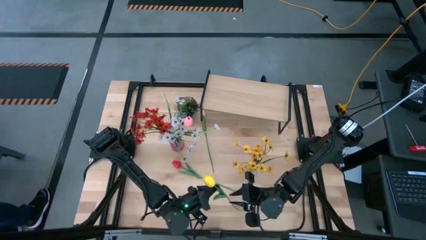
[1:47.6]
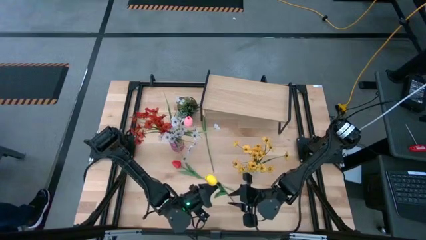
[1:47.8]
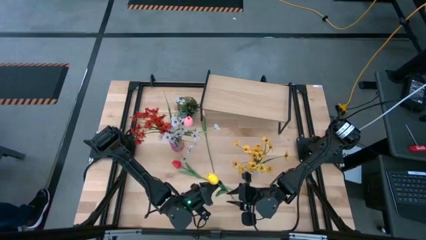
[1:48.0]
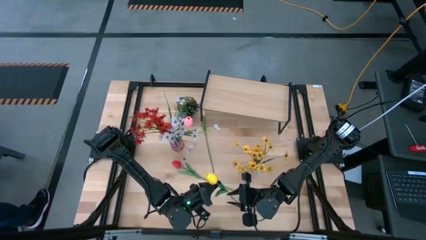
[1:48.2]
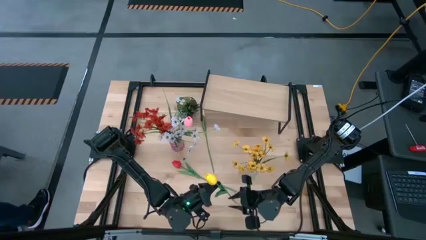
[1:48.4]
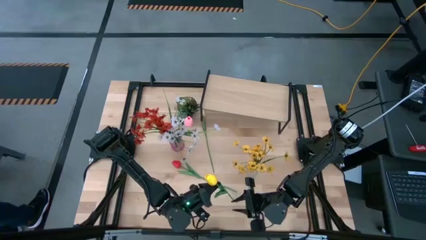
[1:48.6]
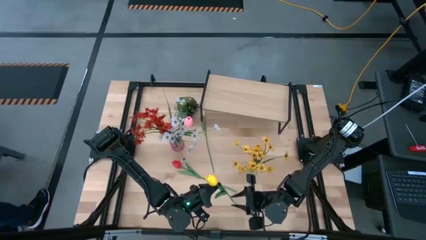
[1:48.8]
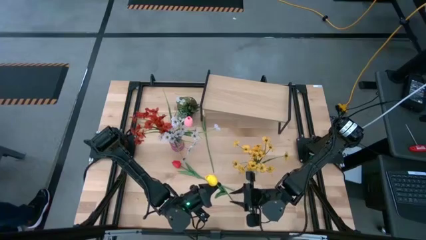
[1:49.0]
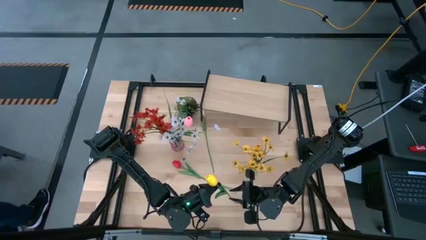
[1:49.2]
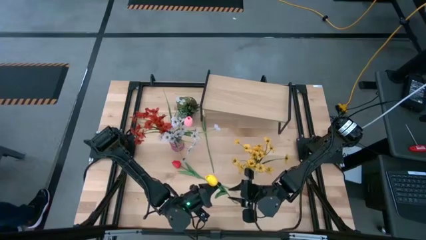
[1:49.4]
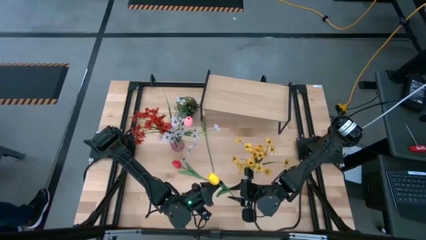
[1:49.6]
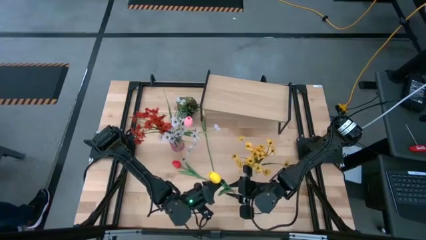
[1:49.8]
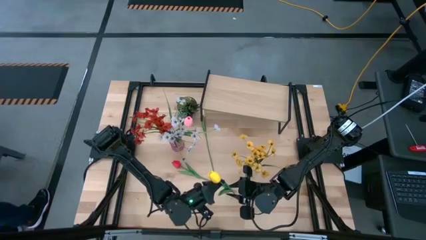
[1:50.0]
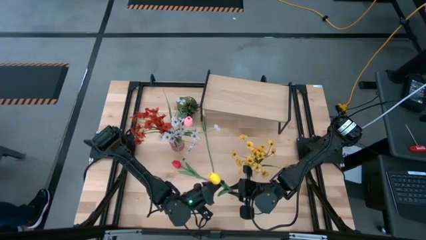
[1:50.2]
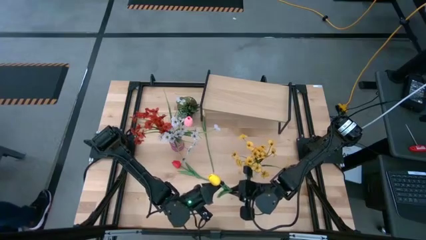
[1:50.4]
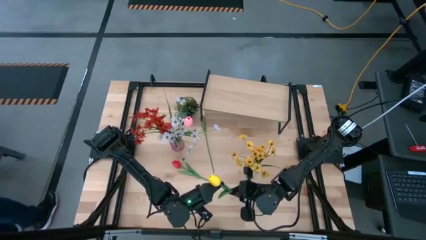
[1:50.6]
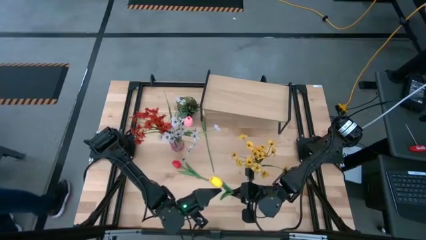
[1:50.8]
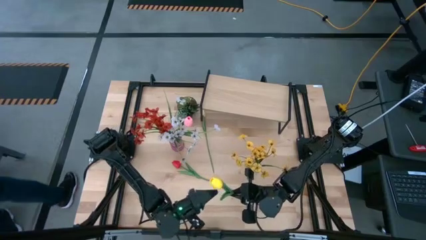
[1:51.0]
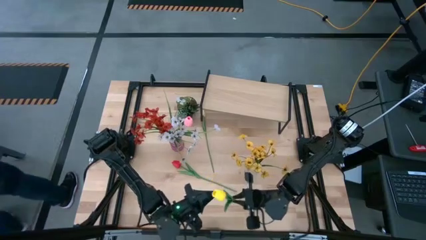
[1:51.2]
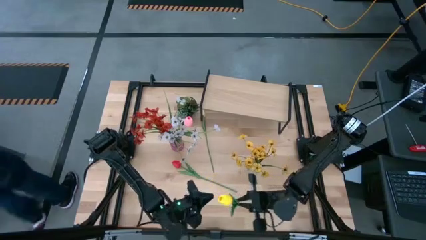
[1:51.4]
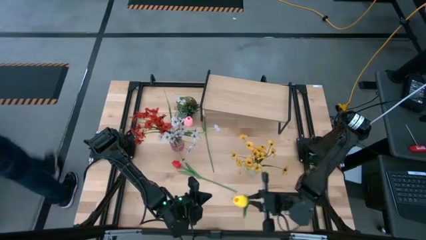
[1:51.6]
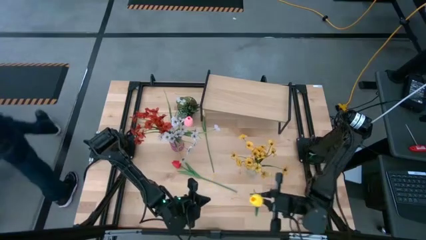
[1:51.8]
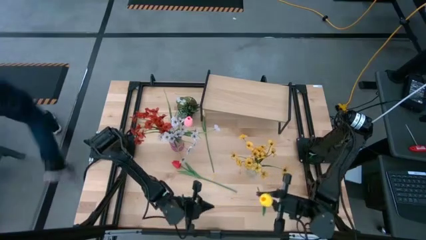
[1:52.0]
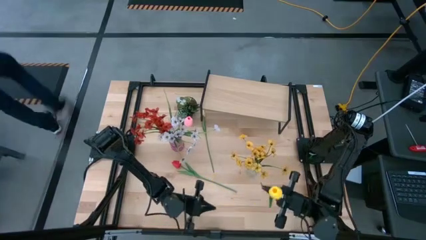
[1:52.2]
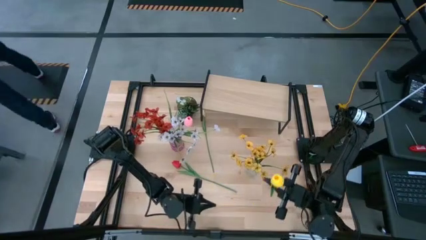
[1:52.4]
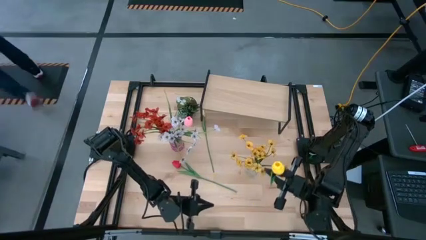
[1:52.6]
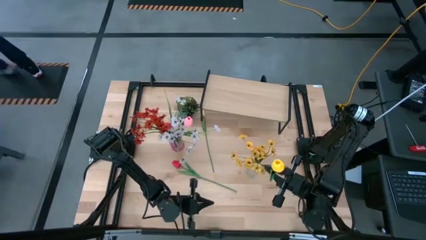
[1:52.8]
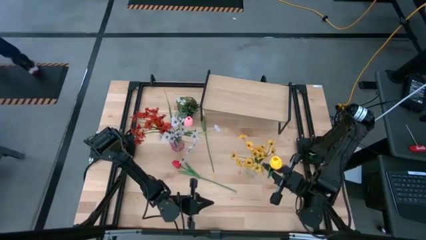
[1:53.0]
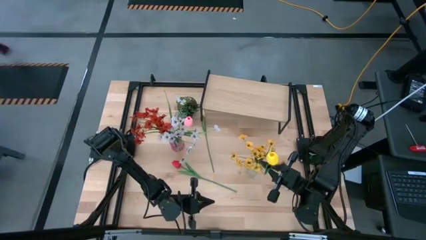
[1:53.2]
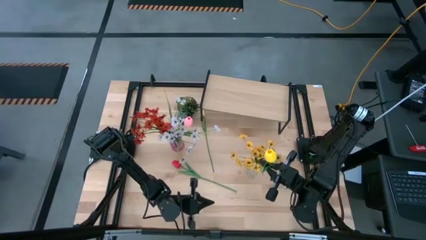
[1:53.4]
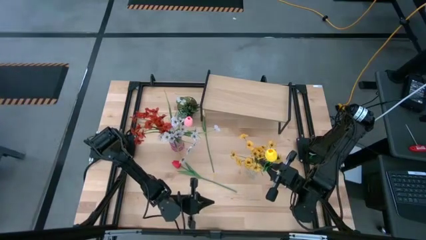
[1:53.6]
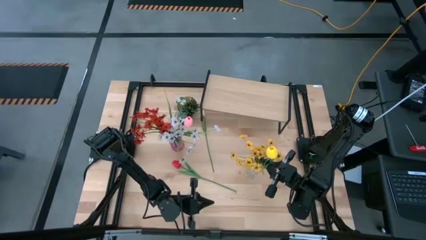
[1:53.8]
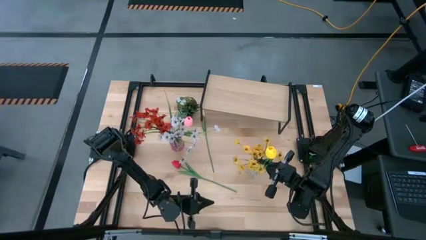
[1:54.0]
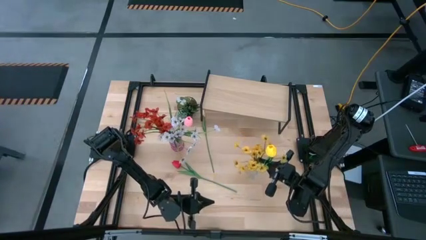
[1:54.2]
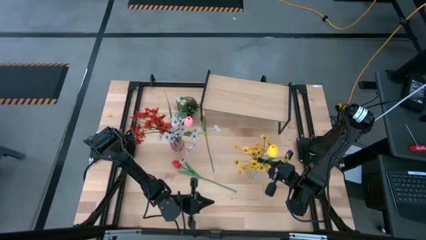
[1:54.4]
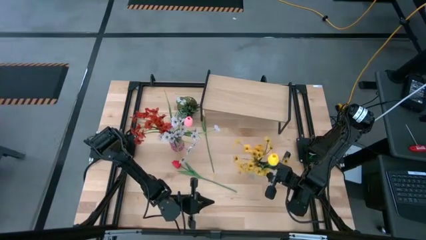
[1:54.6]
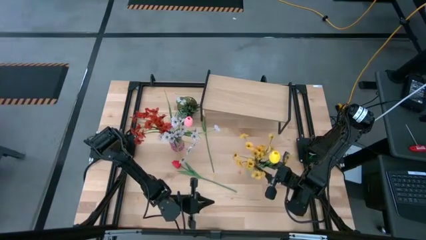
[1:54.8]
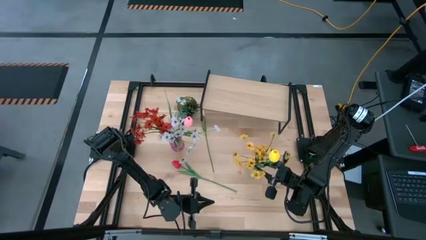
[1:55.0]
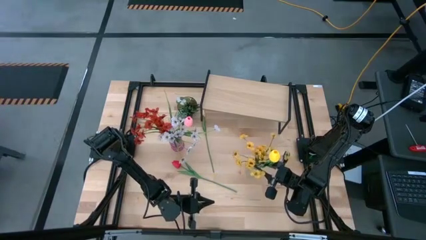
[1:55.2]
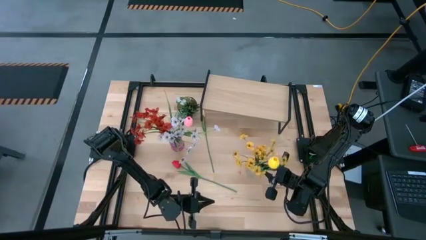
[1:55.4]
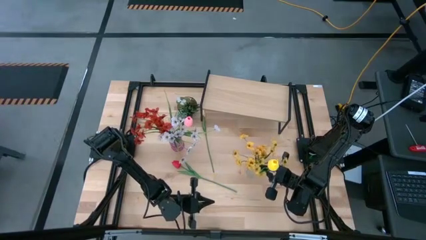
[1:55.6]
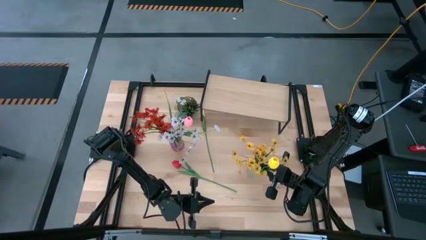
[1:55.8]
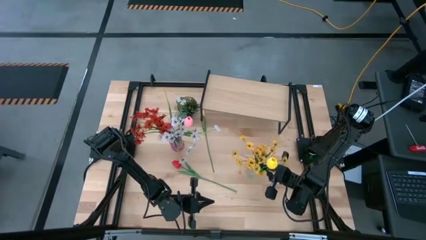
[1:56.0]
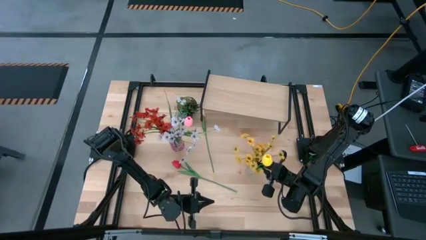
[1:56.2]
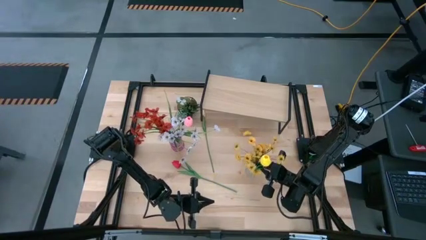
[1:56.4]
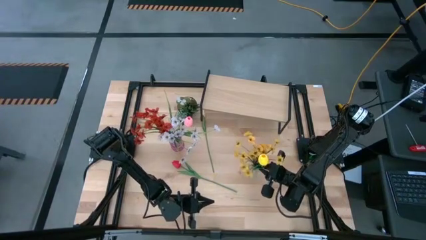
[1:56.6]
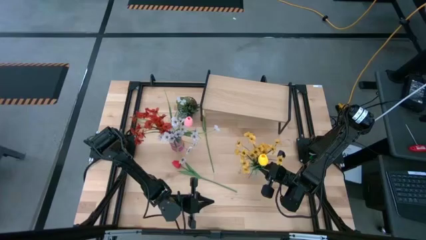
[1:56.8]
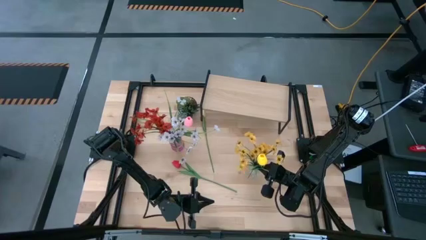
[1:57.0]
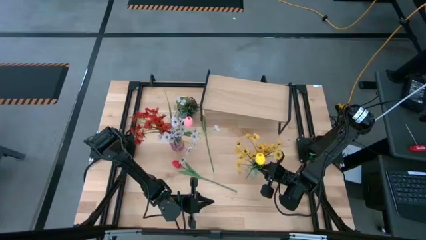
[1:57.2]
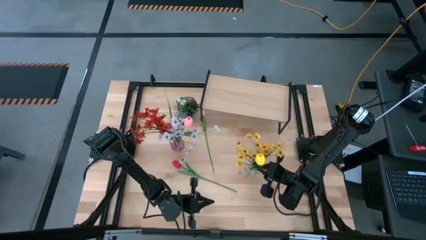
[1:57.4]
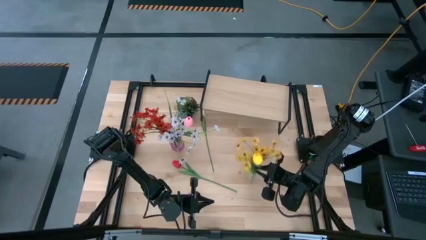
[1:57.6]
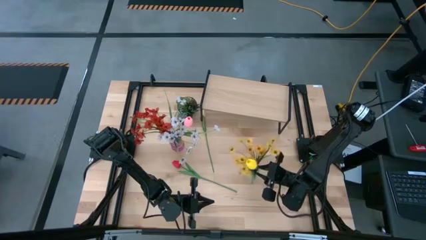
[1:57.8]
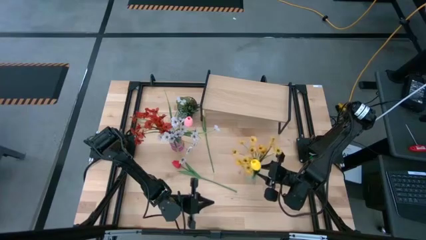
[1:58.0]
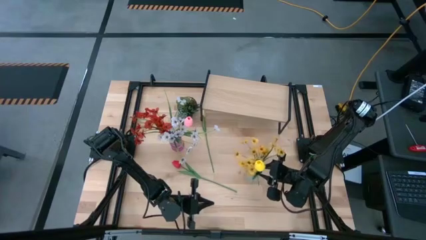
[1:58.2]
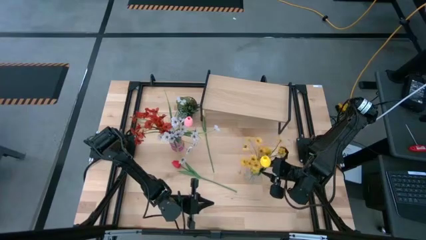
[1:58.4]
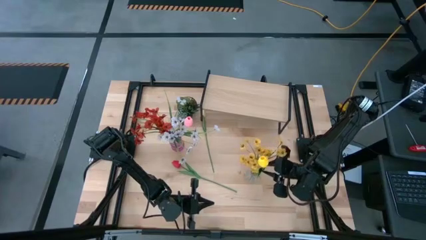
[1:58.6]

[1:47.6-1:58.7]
Task: Pick and place flowers into a vace then onto a shelf
Put the yellow flower into the transparent vase

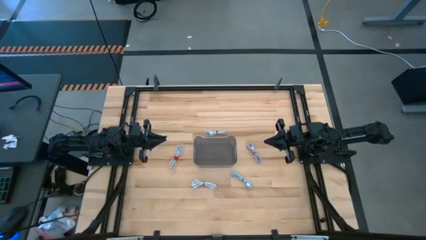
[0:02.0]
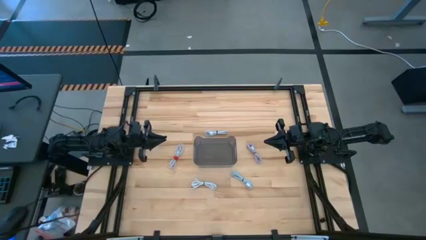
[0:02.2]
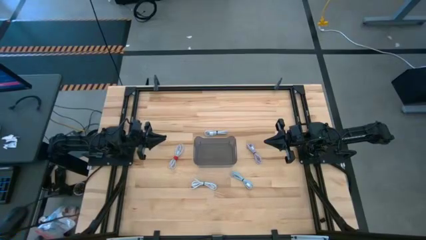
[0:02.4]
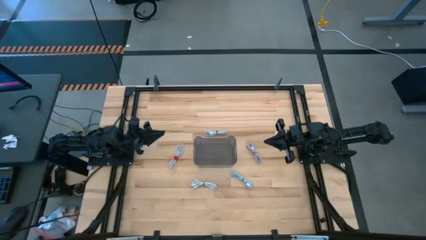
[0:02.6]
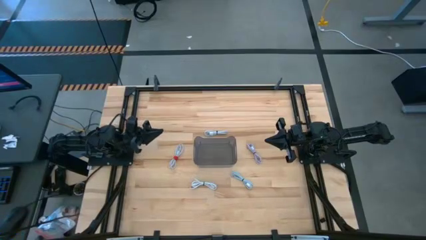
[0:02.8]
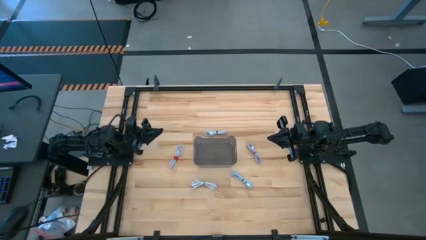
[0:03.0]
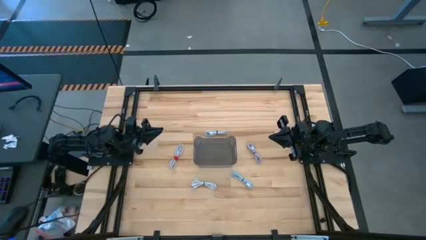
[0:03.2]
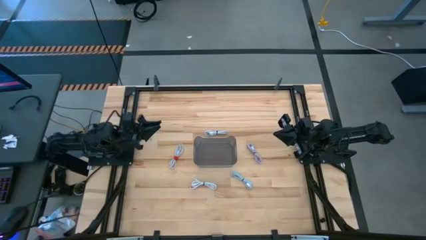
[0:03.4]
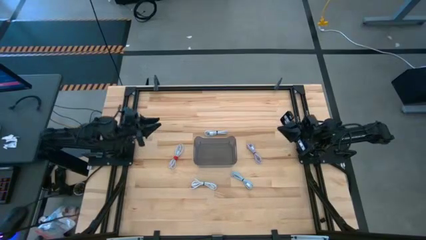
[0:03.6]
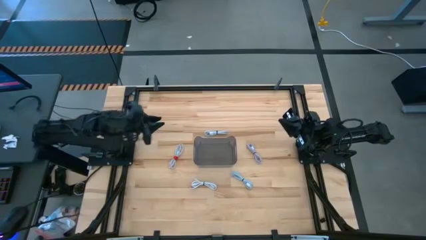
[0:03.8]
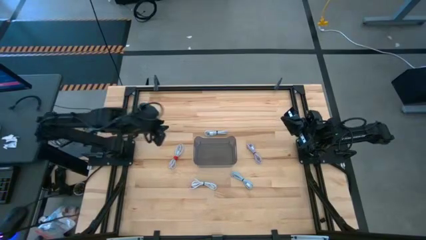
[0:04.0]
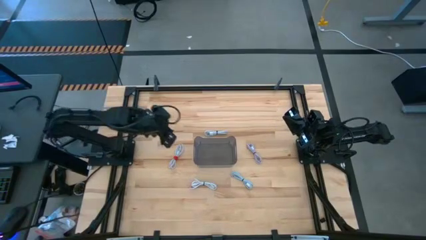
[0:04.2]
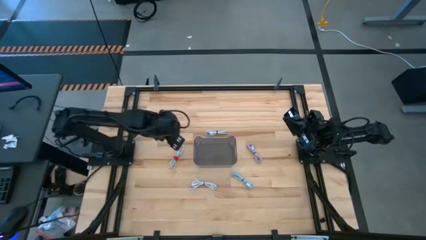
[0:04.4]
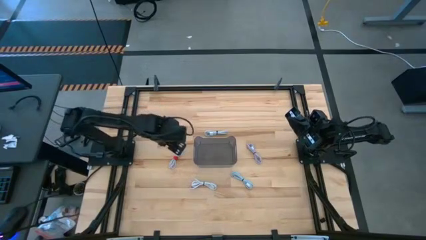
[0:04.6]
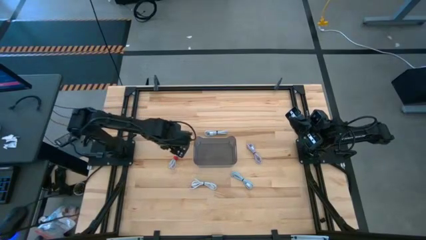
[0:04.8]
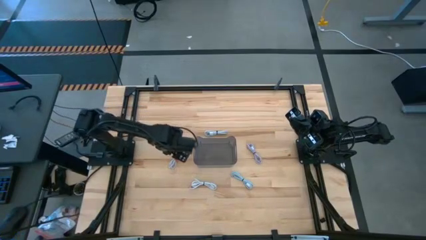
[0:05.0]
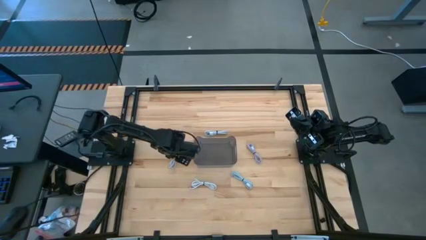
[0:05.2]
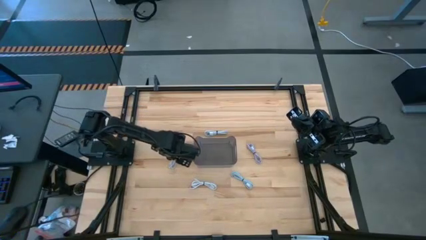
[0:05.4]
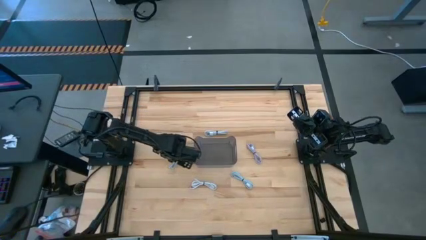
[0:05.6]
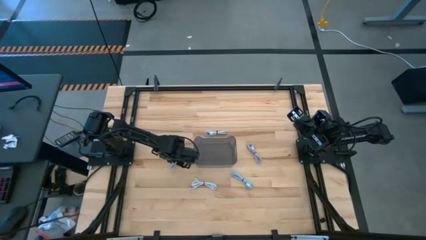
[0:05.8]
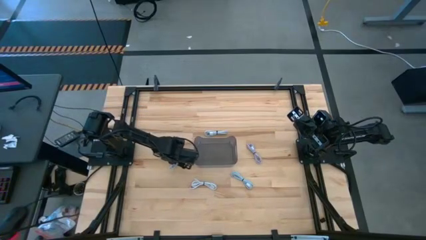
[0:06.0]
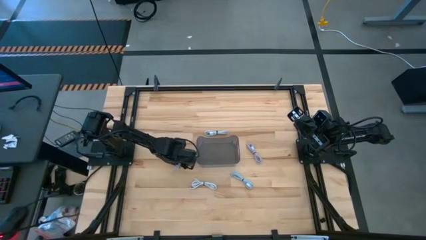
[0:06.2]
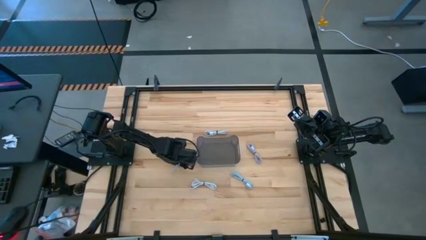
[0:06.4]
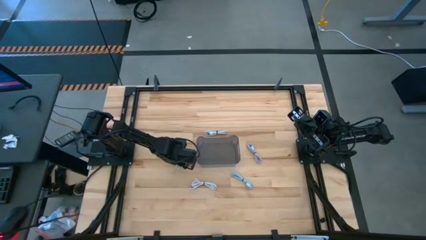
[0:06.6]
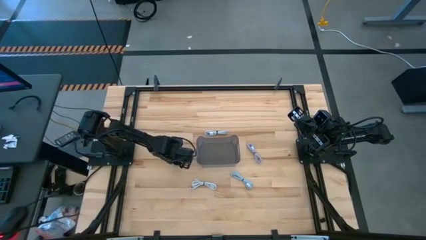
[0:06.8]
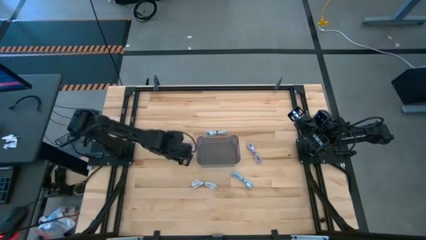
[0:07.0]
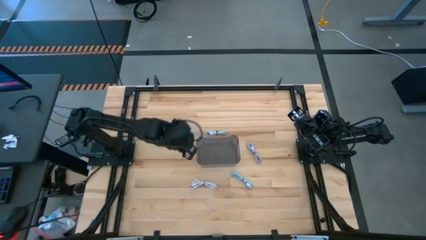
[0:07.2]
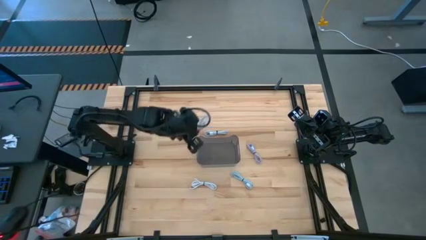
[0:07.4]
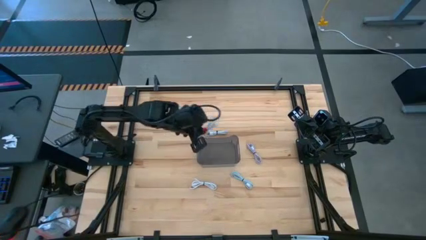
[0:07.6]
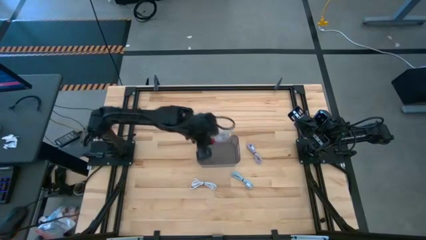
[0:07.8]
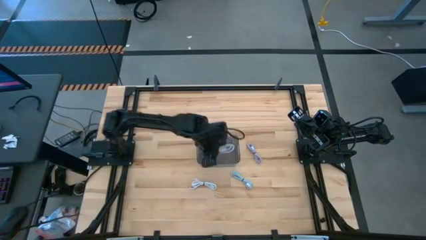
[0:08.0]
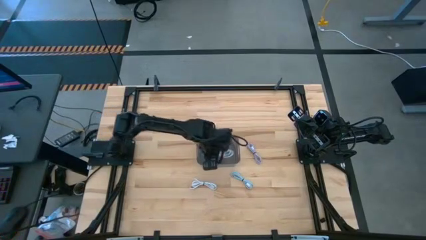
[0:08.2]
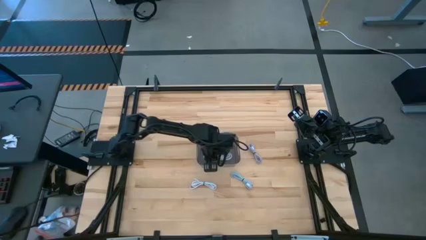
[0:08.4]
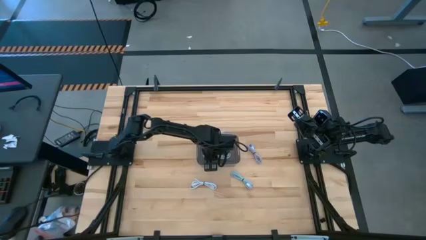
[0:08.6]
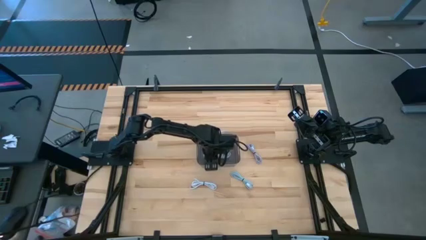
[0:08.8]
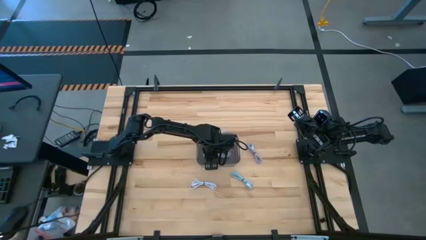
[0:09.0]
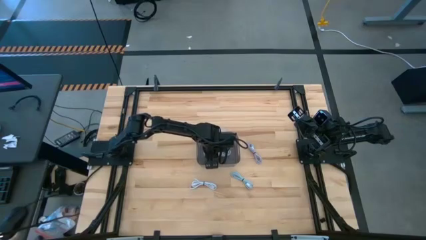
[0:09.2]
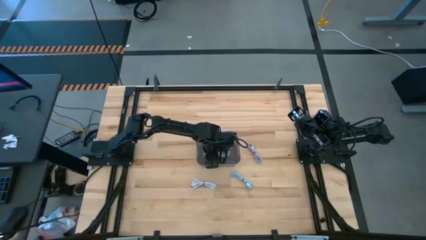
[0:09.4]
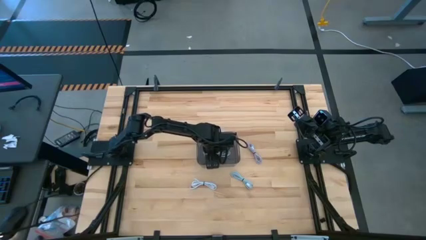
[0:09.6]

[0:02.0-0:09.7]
Task: Pick and place USB-C Cables
Put the middle white charger cable into the black bin
